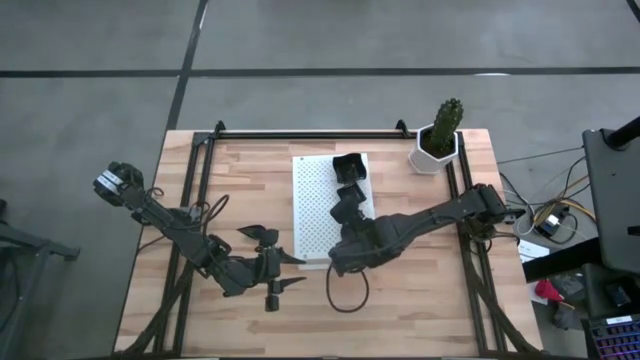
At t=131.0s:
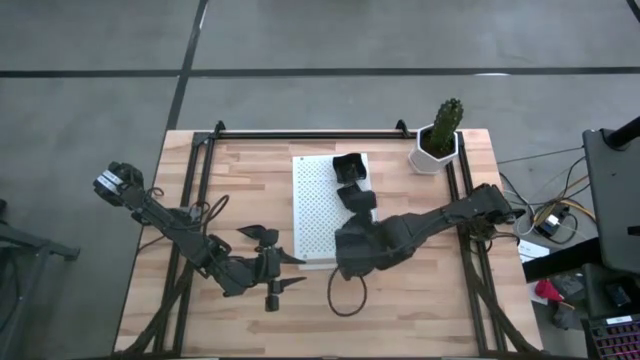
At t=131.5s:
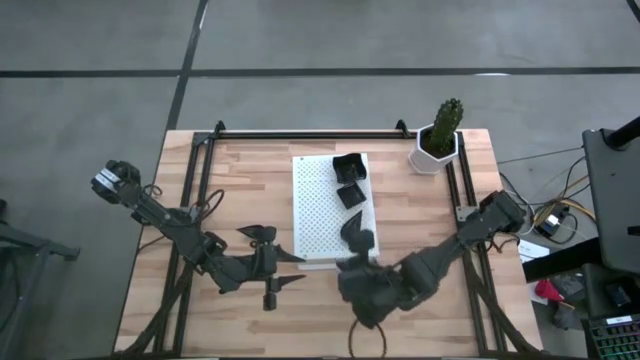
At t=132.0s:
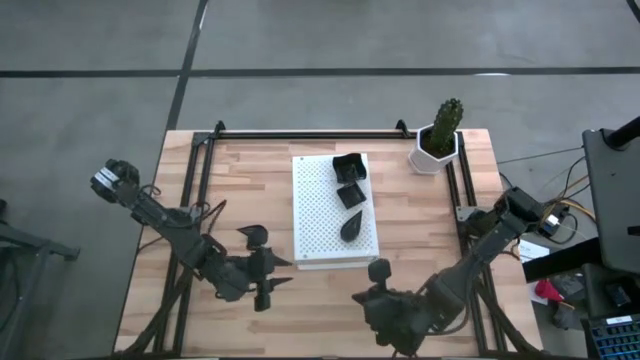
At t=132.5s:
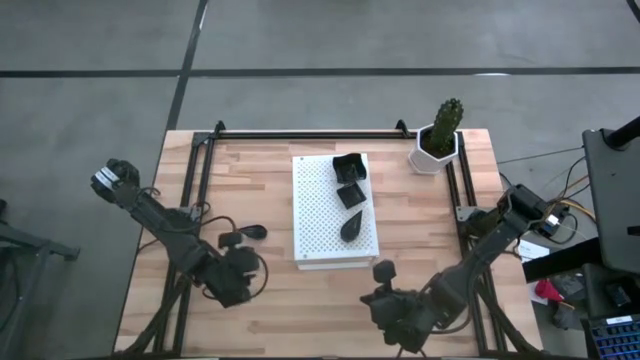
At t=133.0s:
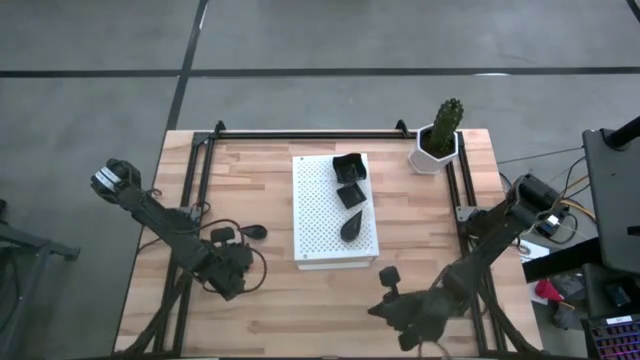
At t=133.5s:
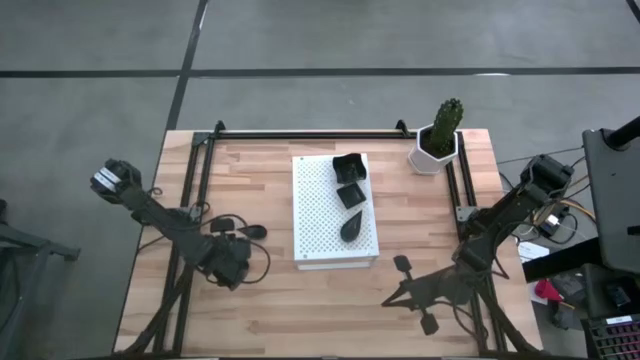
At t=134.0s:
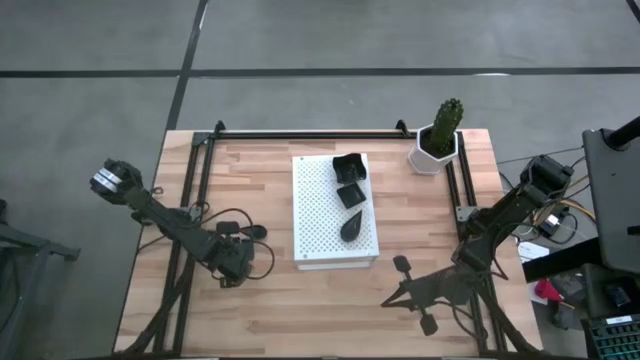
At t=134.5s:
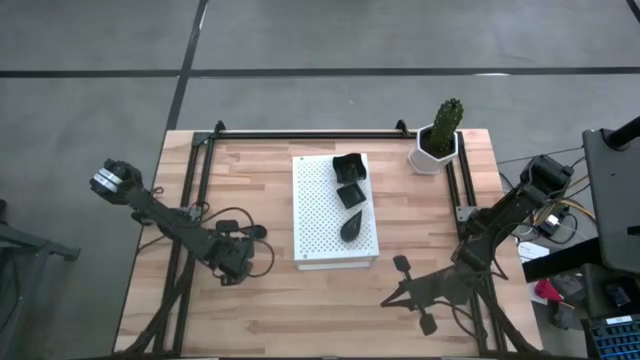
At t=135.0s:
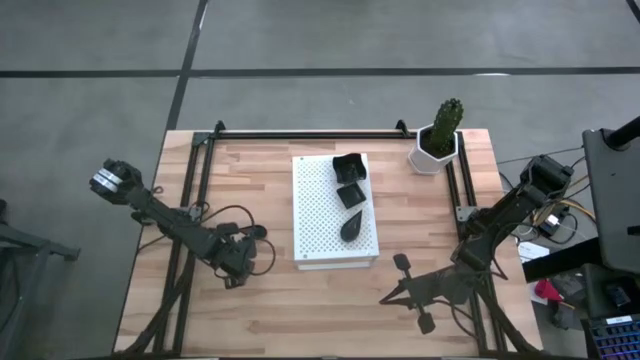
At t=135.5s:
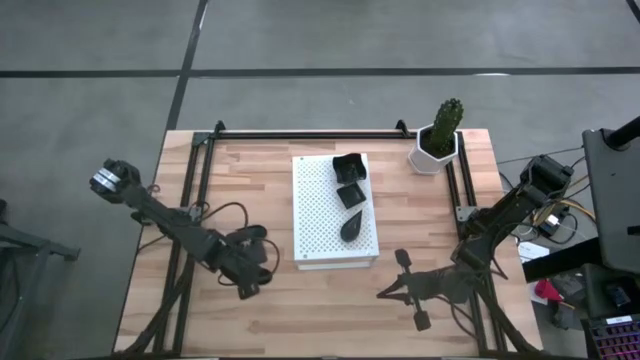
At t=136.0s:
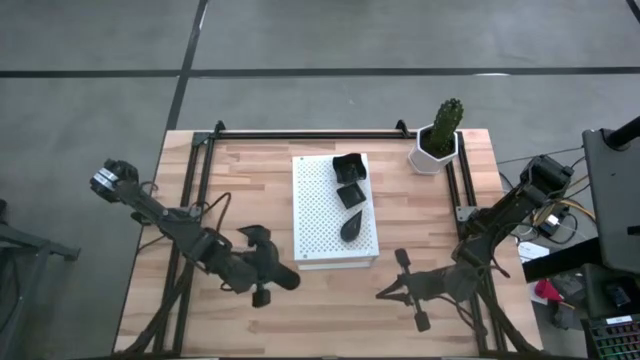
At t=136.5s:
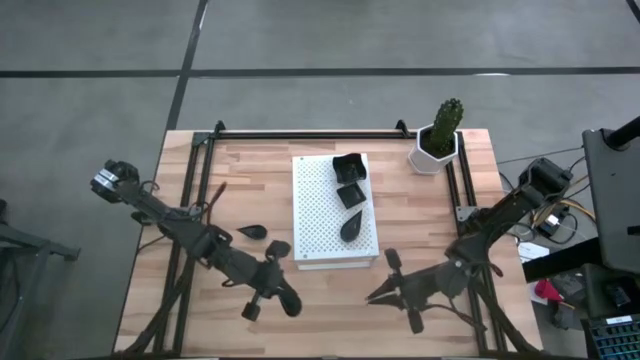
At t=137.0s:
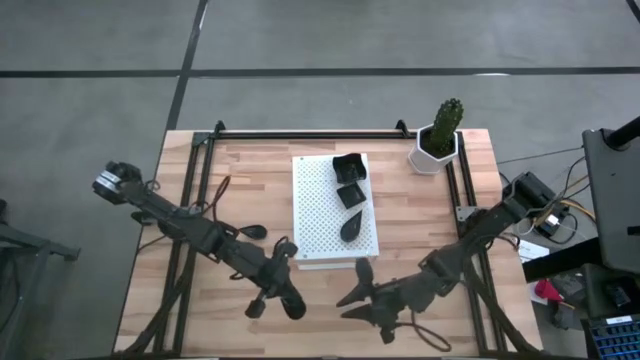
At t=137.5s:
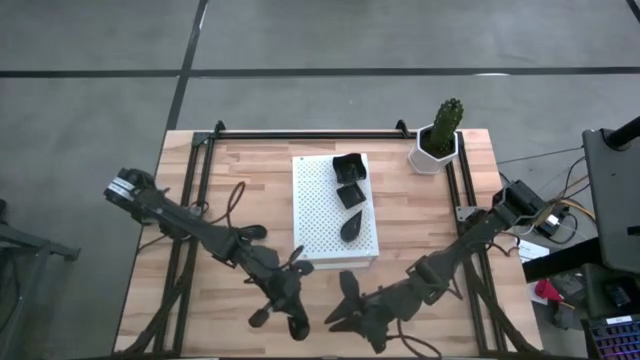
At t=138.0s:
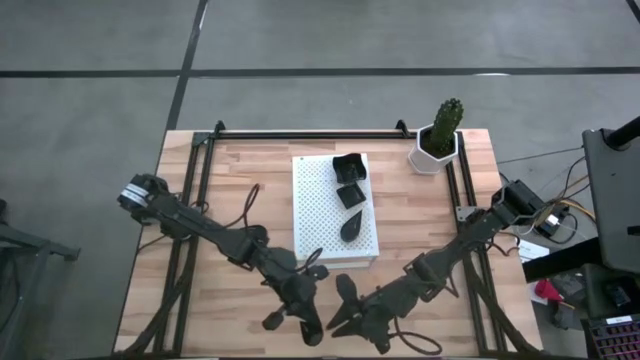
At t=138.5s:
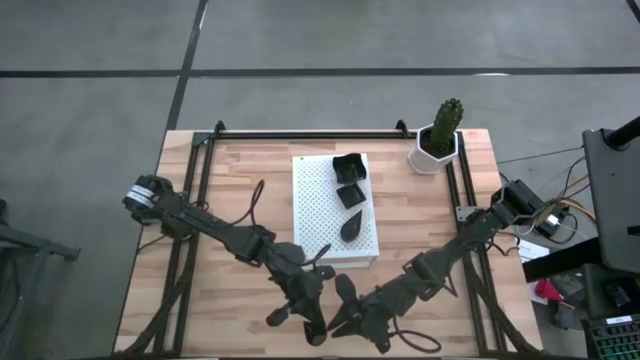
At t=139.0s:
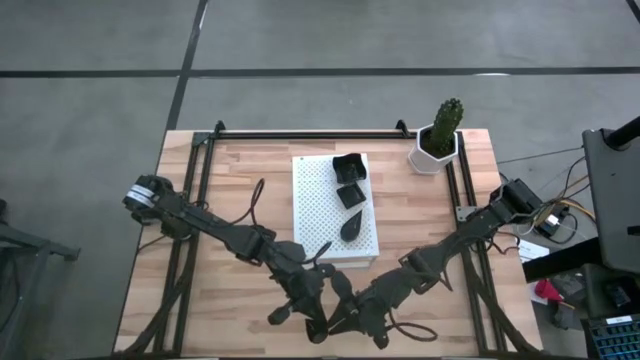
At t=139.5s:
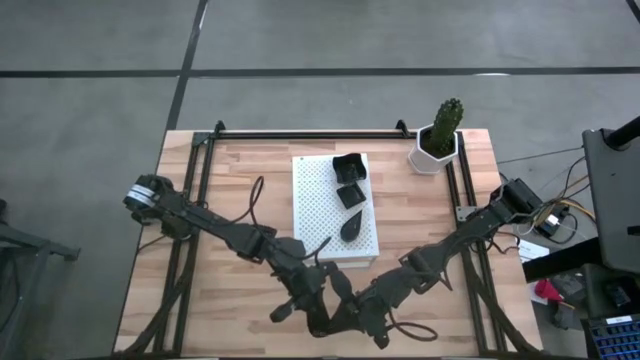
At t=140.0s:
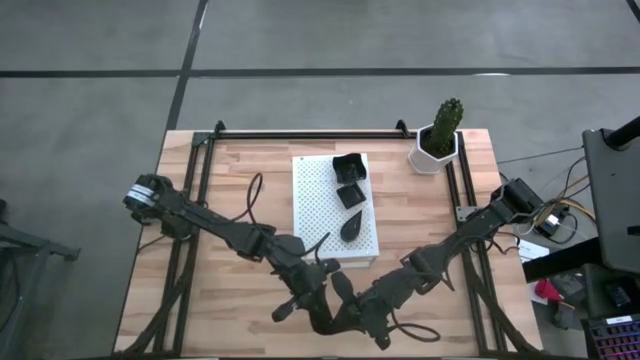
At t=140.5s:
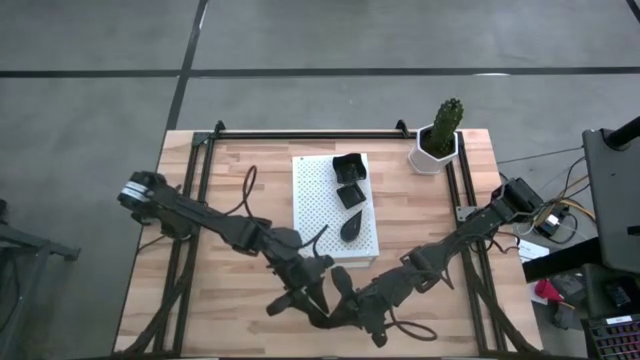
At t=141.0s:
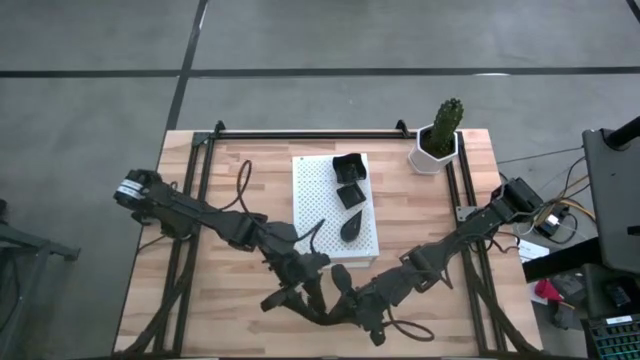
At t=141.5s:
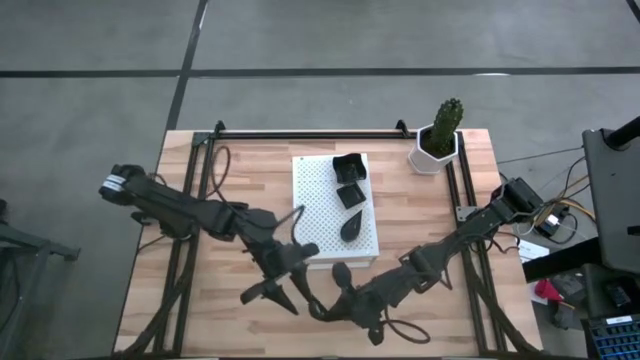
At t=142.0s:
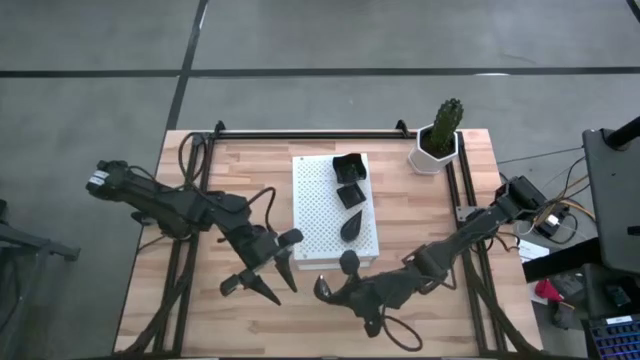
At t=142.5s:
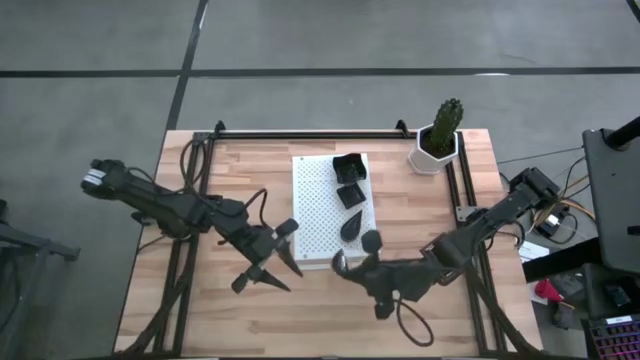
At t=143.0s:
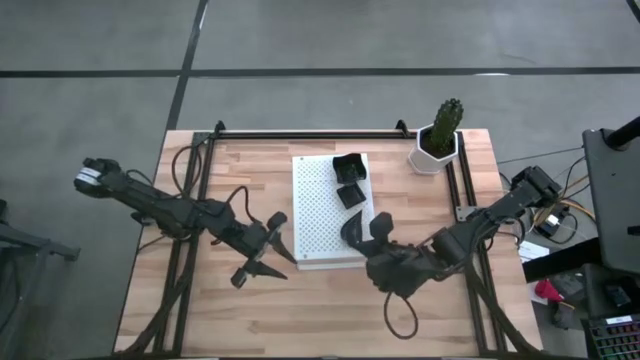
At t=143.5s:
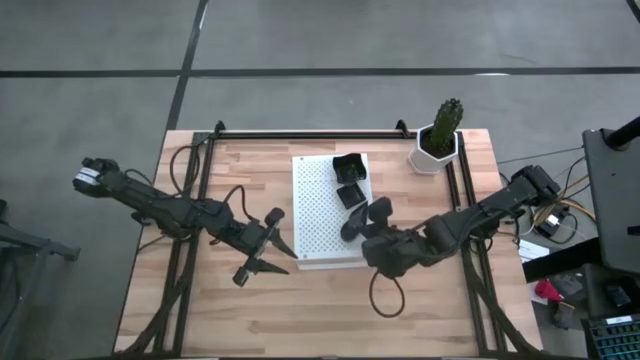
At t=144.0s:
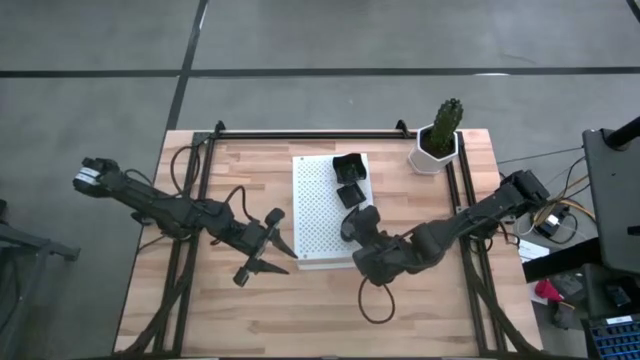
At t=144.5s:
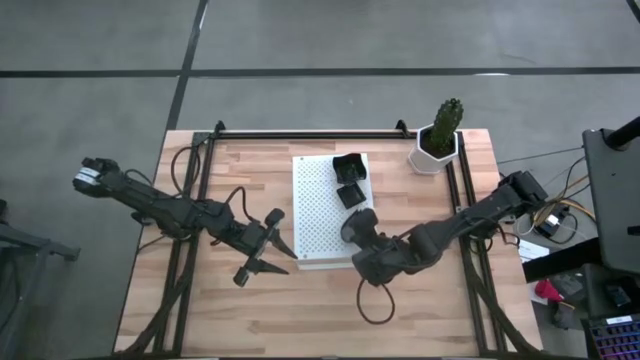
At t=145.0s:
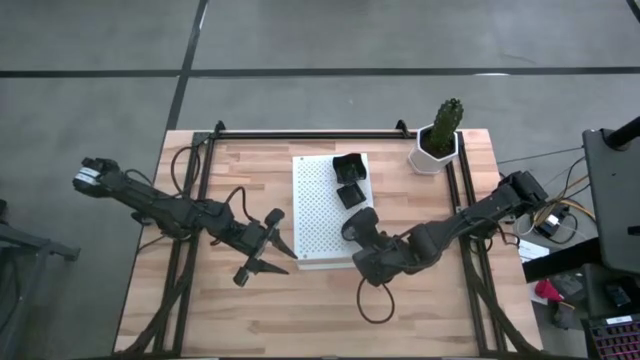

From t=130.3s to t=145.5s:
Task: Pick & Place Mini shaped plates
Stack the black drop-shaped plate on top of the black drop-shaped plate on the shelf

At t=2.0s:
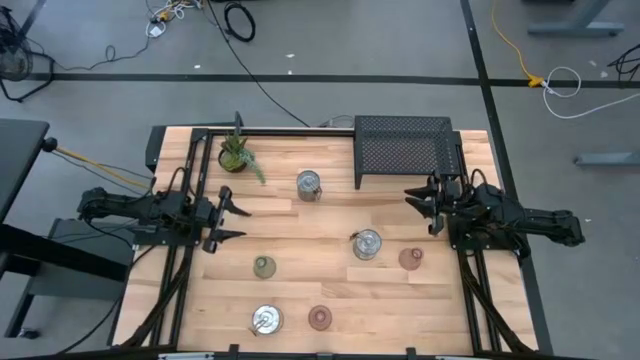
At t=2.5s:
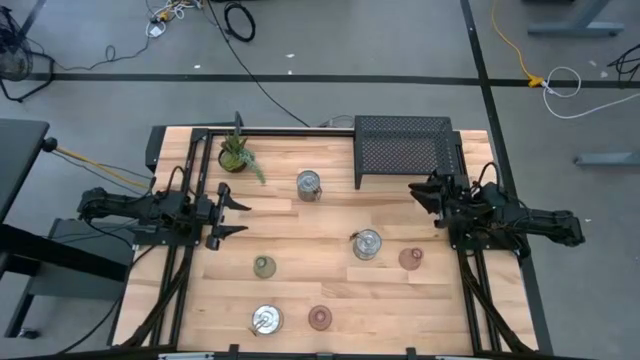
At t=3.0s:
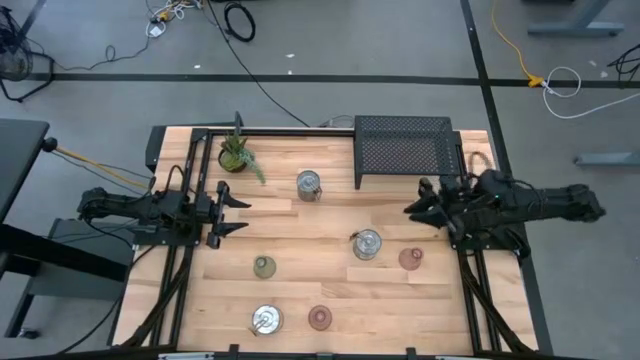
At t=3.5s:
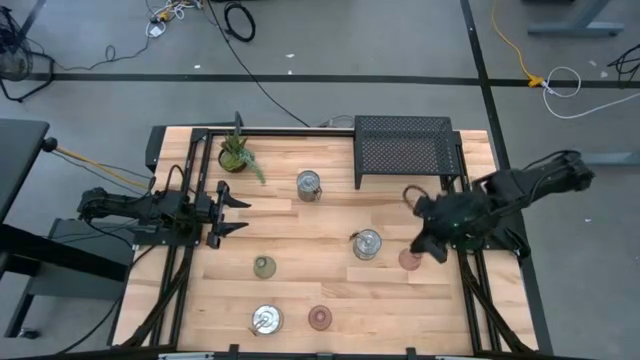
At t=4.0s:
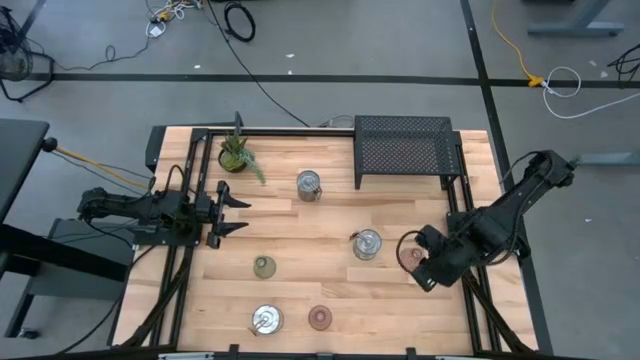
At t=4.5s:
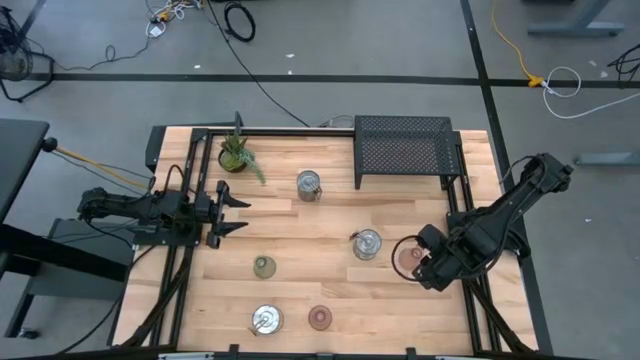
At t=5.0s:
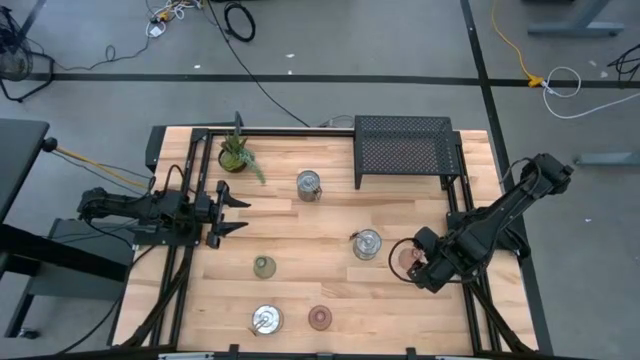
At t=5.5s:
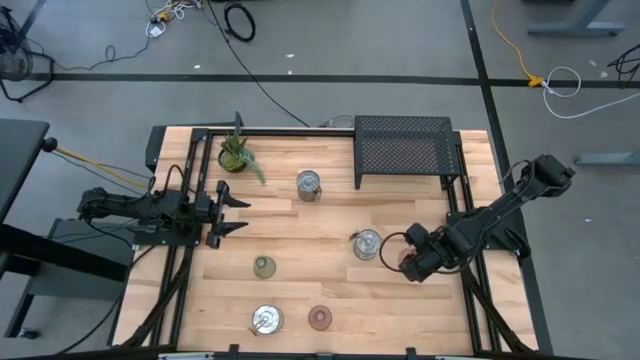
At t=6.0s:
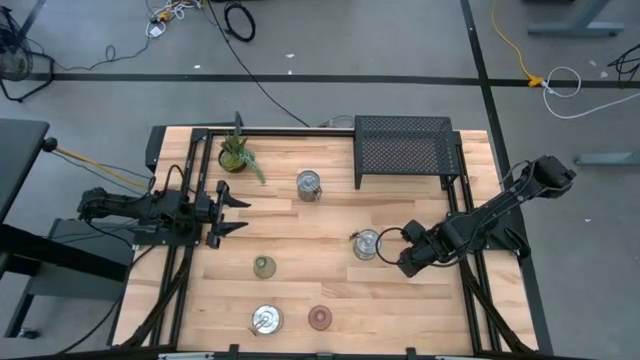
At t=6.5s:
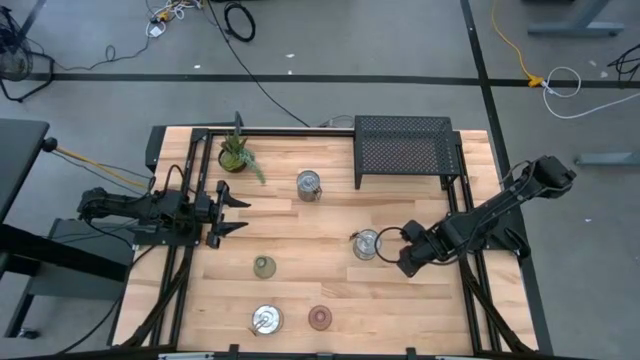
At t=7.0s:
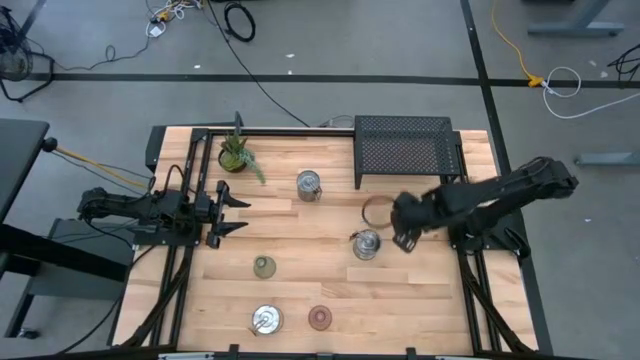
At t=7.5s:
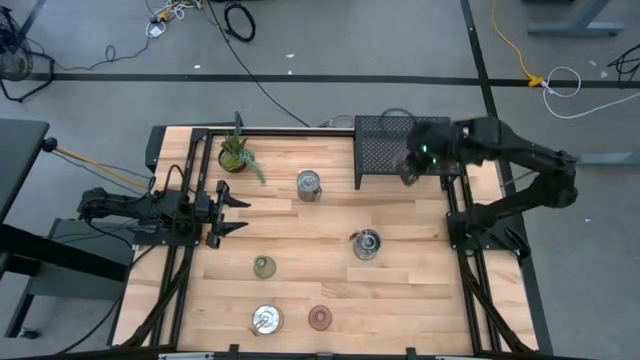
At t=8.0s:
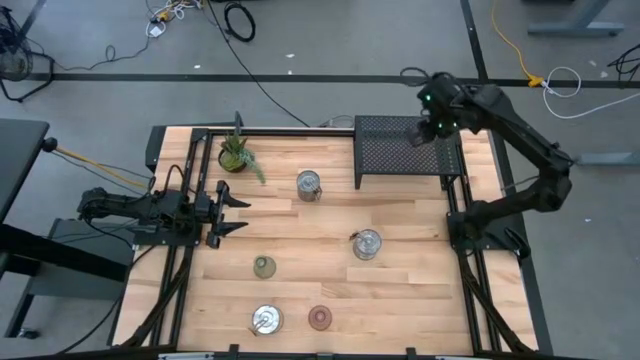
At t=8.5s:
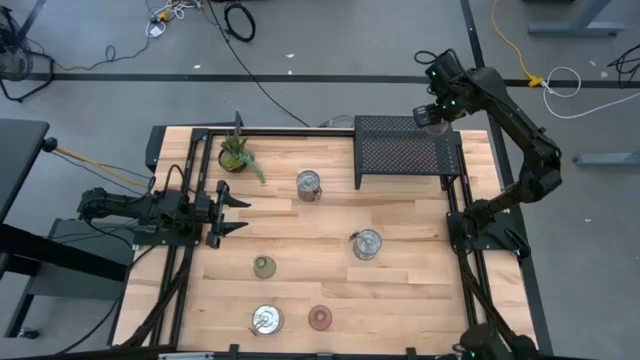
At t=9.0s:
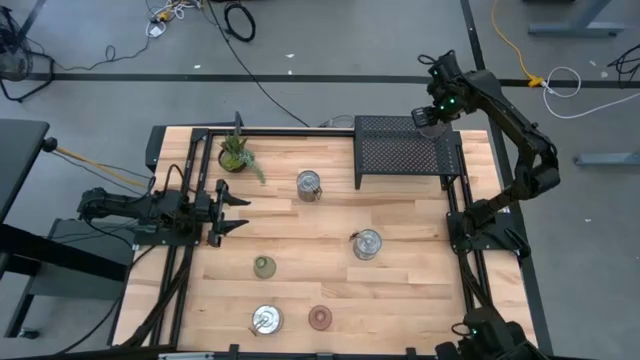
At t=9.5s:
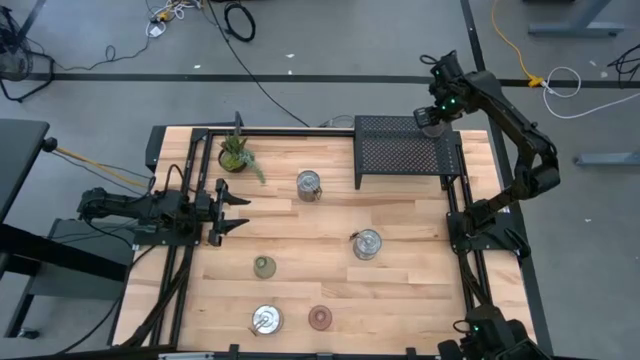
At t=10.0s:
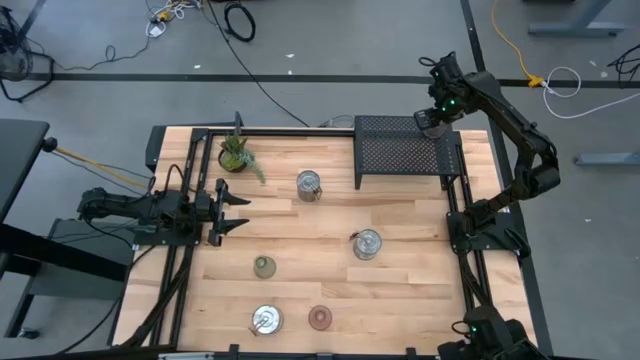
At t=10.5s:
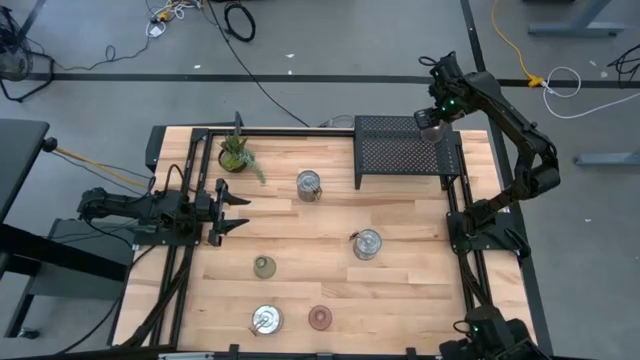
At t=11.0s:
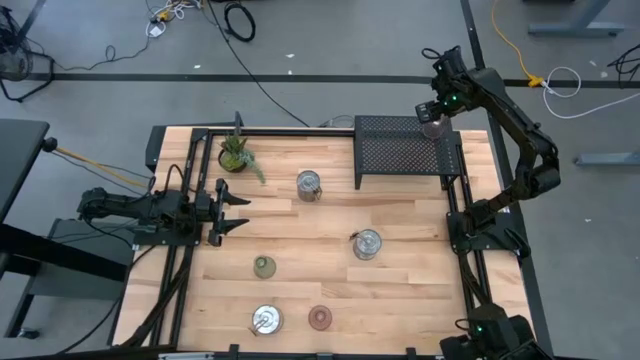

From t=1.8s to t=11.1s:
Task: Pick & Place candle stick holders
Put the right pink glass candle holder on the shelf
